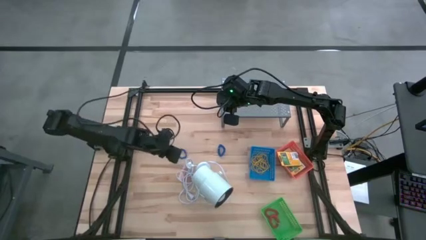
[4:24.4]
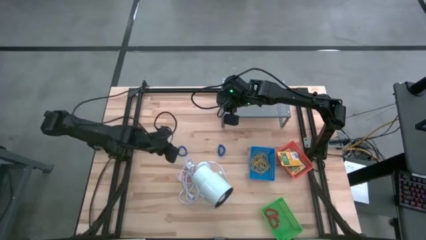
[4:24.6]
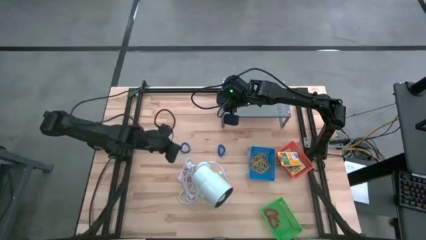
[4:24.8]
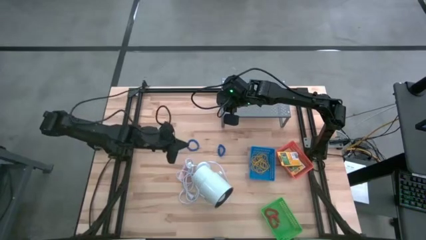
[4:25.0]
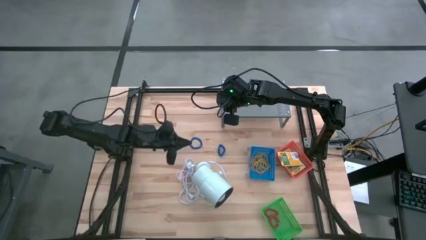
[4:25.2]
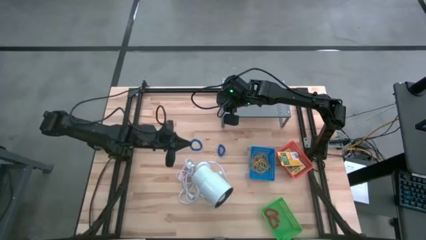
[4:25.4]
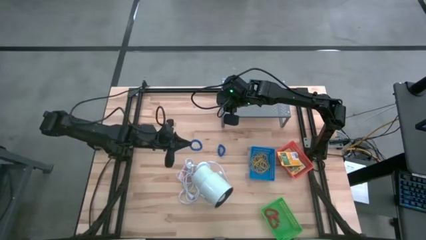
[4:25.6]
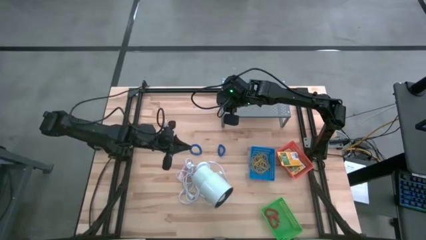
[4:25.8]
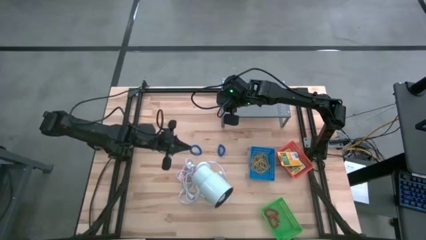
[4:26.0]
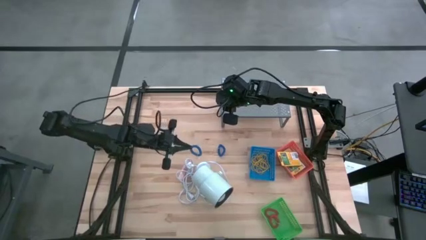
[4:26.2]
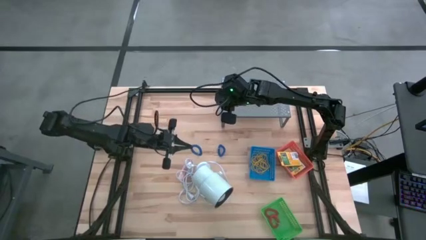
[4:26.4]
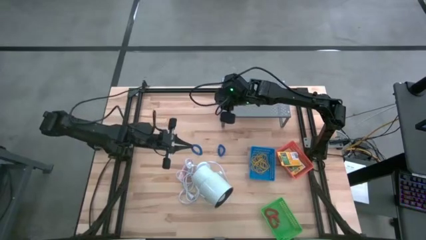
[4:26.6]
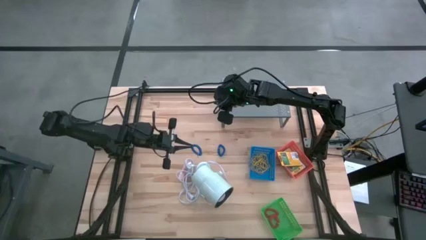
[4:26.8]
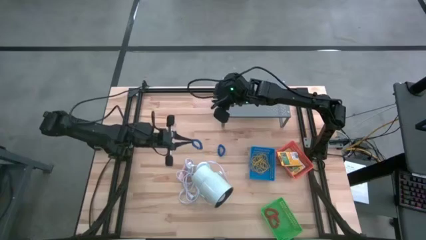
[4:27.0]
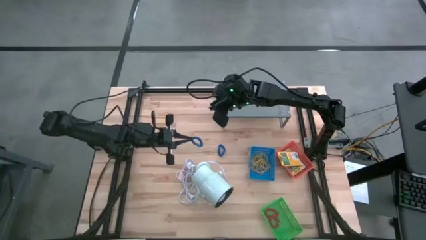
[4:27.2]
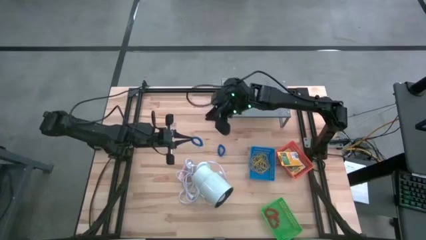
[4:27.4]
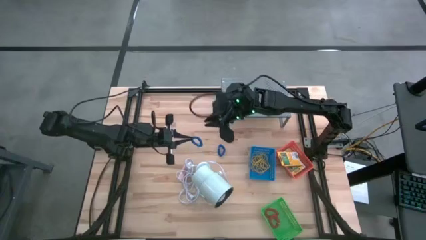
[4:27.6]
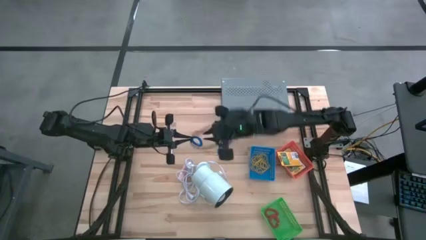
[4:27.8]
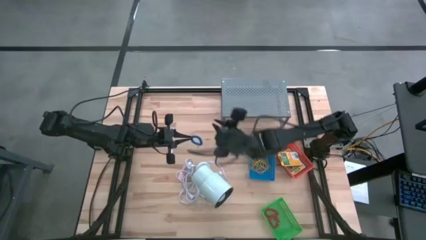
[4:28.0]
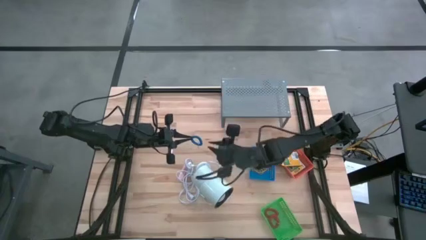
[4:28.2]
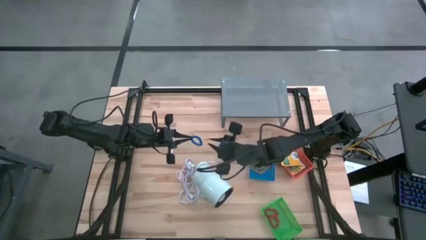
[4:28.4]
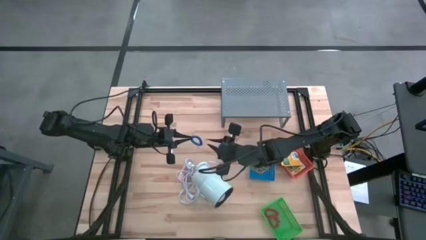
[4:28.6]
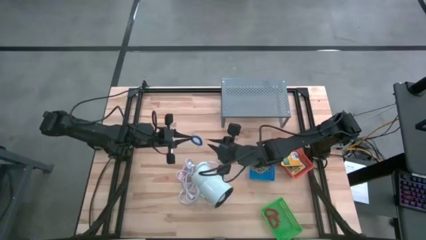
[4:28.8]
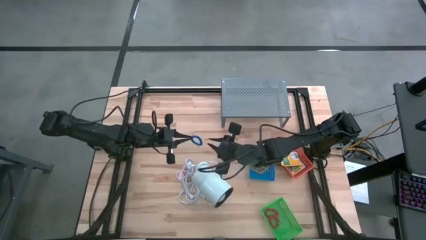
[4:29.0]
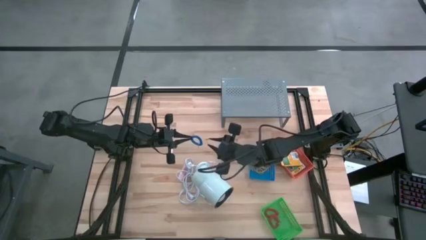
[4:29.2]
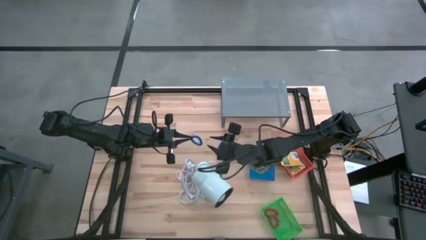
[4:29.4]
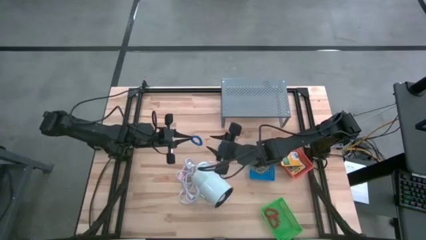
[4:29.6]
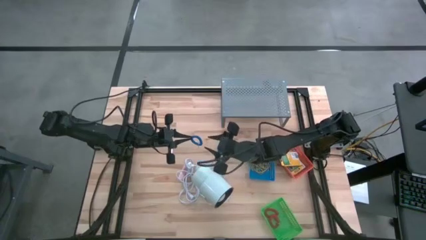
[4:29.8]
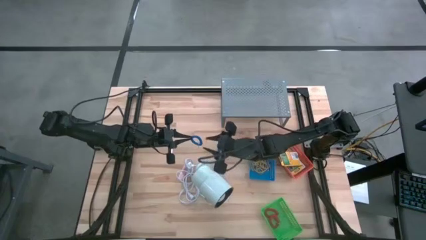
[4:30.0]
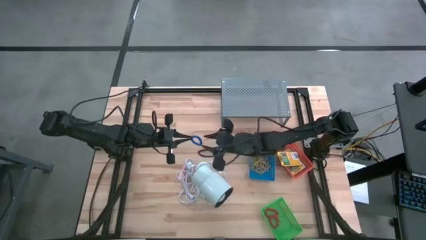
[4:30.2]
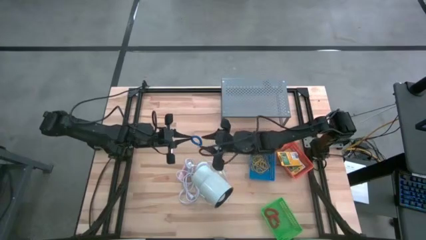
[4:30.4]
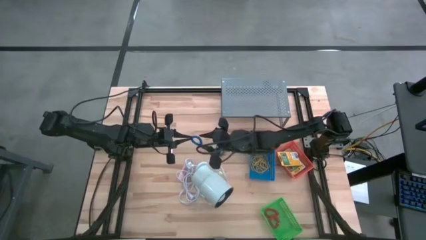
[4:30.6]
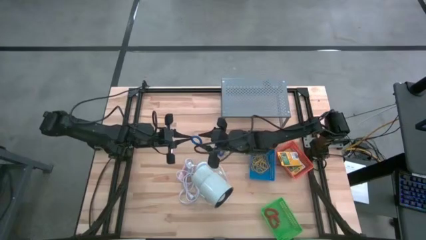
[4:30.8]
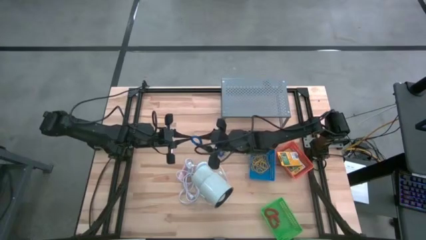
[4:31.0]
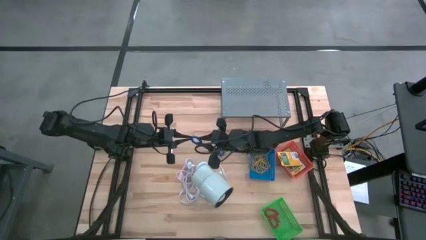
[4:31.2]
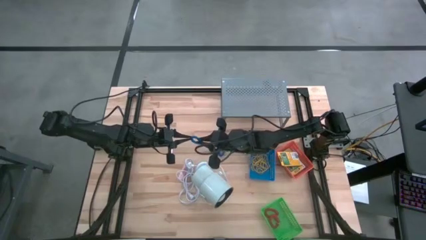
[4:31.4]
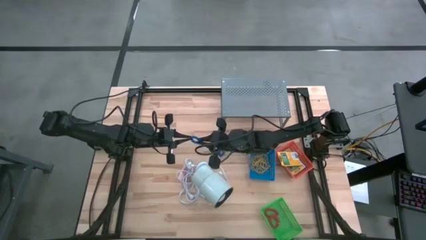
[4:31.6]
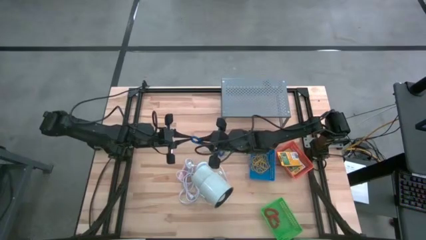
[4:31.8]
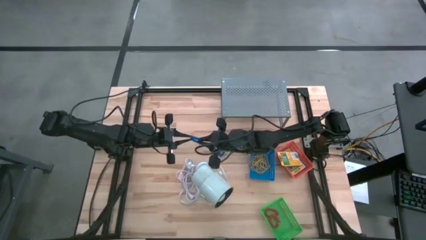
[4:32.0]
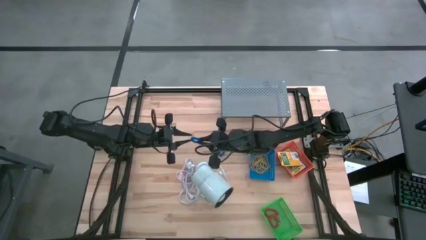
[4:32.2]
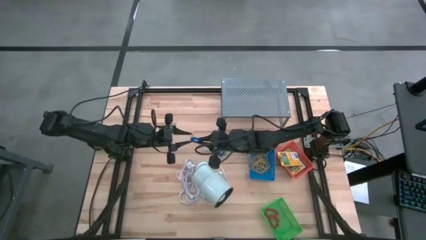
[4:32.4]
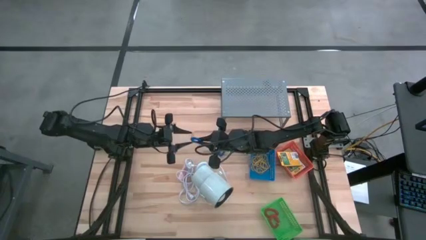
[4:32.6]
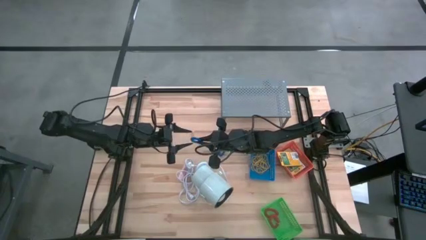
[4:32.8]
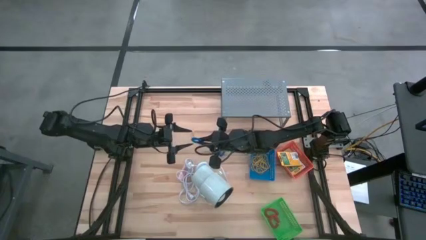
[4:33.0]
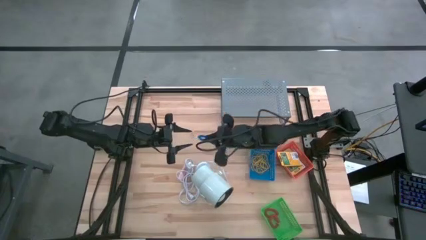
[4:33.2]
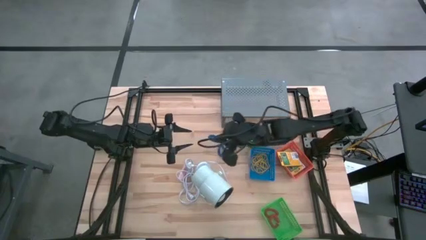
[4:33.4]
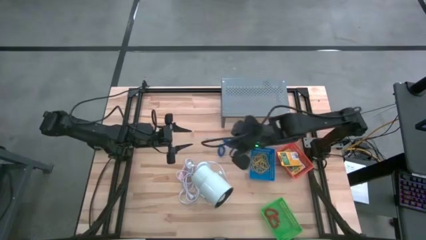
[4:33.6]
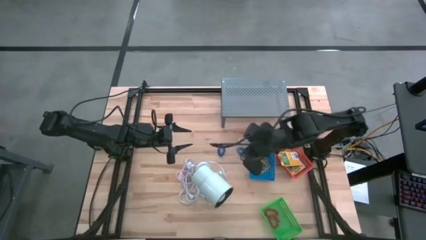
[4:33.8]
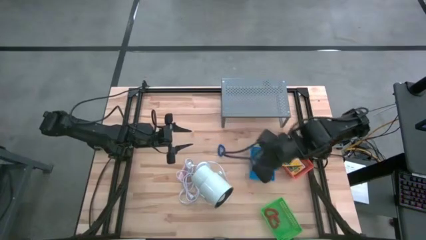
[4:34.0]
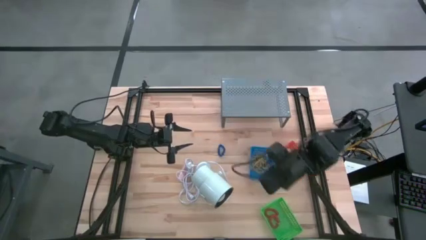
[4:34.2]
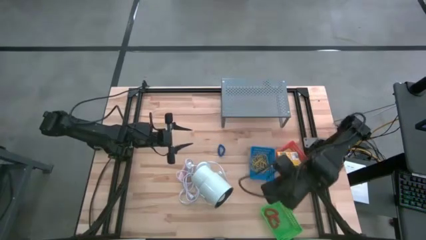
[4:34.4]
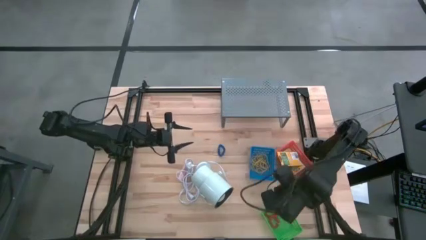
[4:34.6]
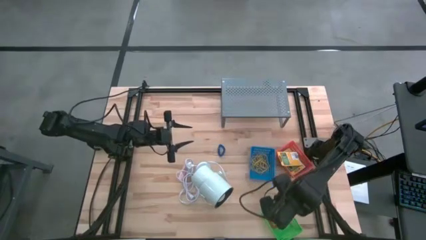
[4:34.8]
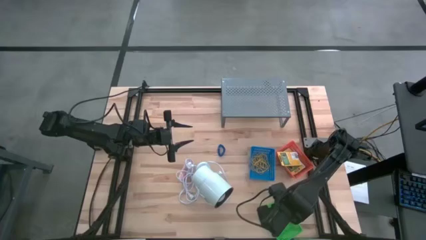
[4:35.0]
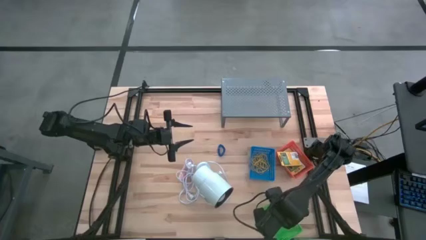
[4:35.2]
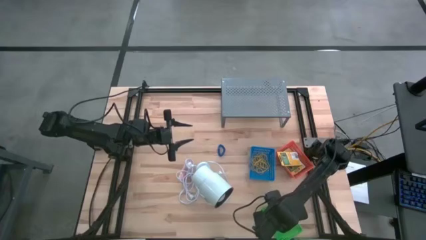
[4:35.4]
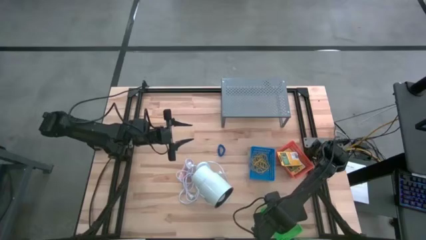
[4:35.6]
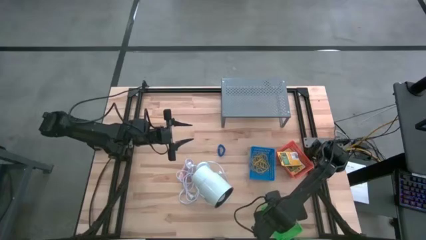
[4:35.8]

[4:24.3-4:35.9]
Task: Pick & Place Office Desk Supplies
Put the blue spring keychain into the green bin

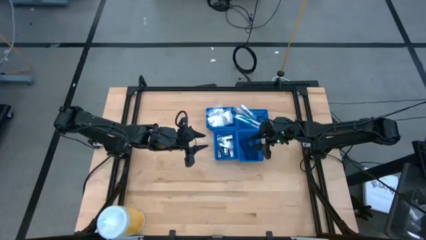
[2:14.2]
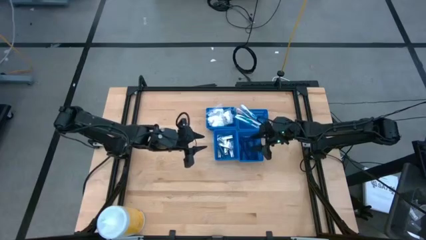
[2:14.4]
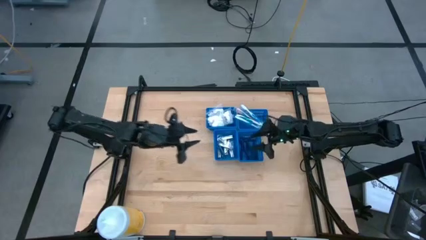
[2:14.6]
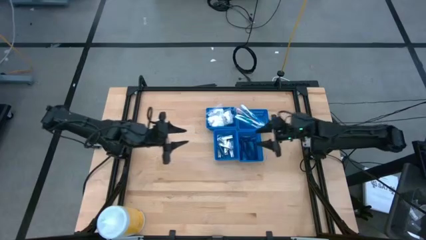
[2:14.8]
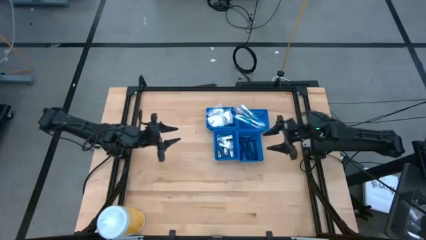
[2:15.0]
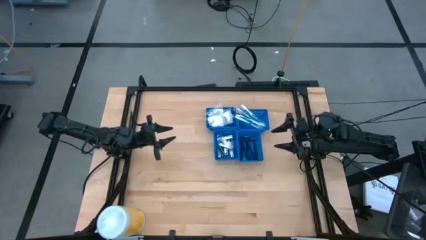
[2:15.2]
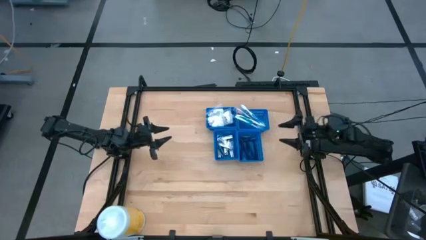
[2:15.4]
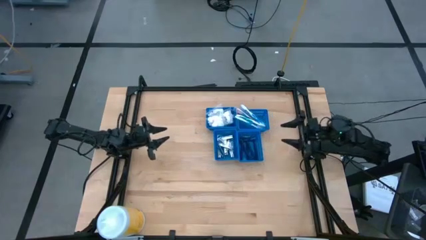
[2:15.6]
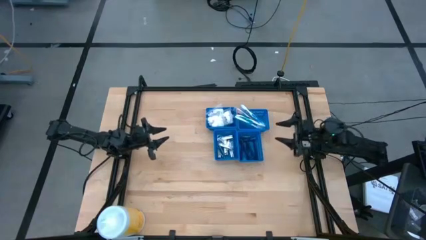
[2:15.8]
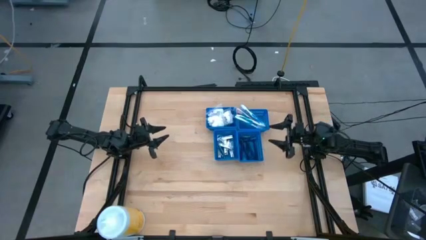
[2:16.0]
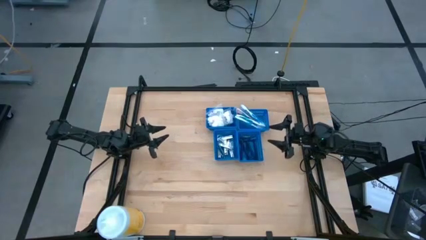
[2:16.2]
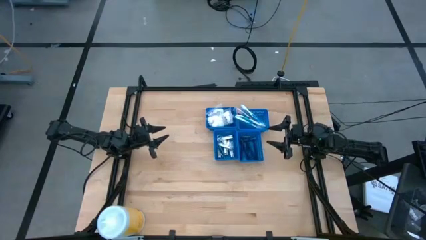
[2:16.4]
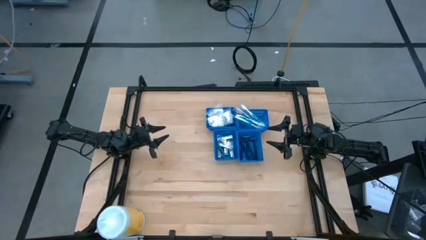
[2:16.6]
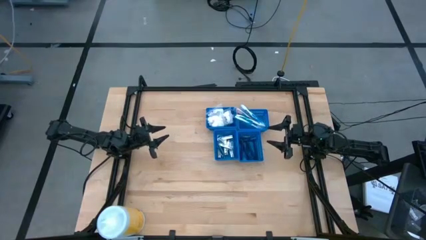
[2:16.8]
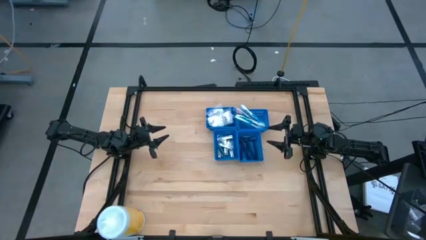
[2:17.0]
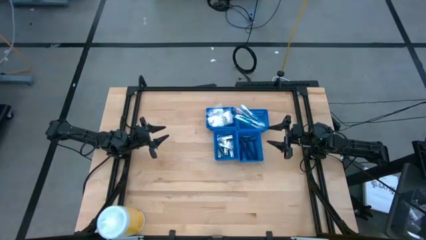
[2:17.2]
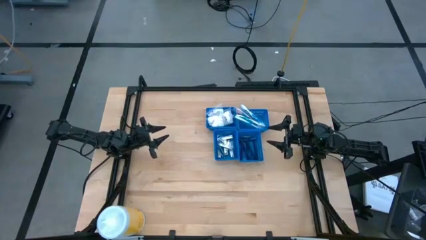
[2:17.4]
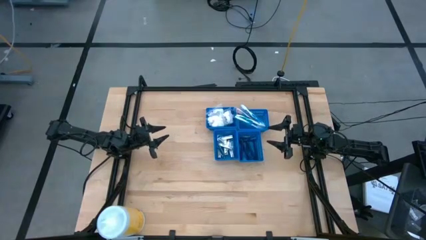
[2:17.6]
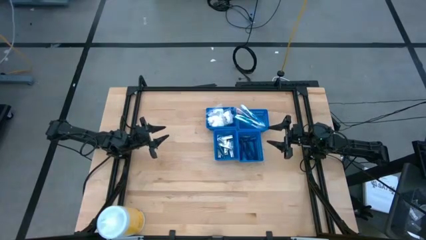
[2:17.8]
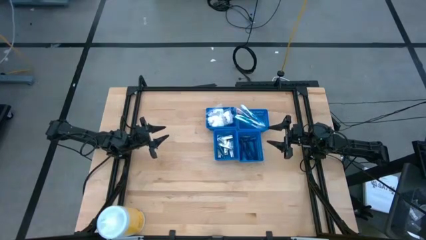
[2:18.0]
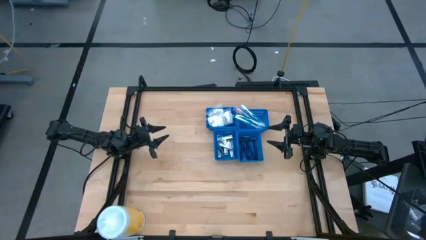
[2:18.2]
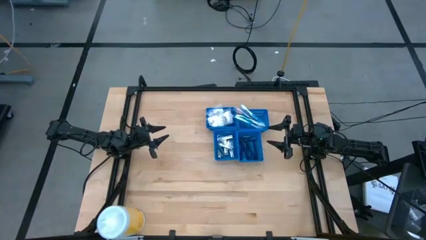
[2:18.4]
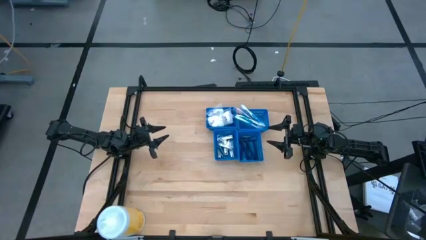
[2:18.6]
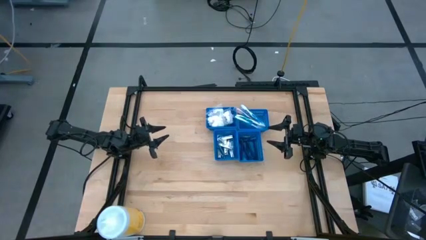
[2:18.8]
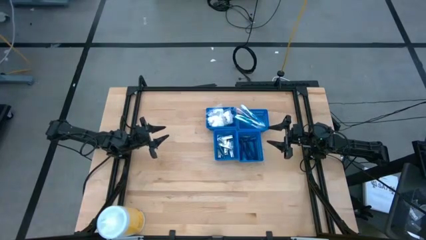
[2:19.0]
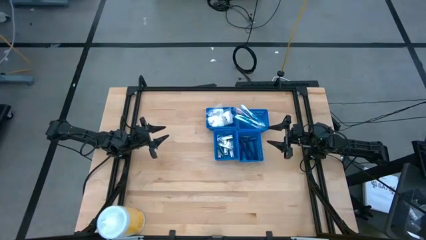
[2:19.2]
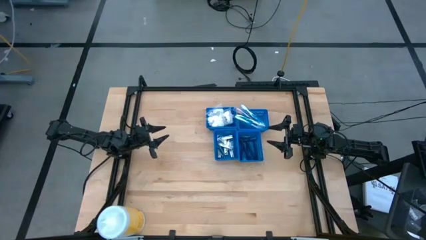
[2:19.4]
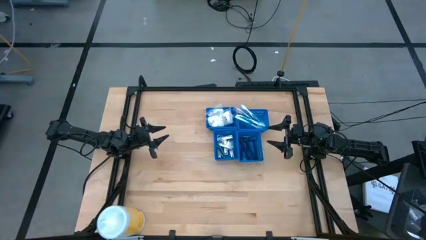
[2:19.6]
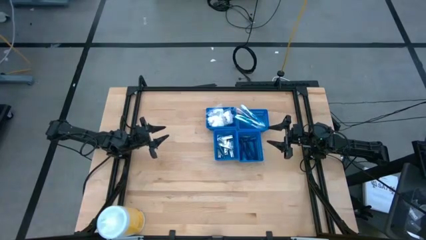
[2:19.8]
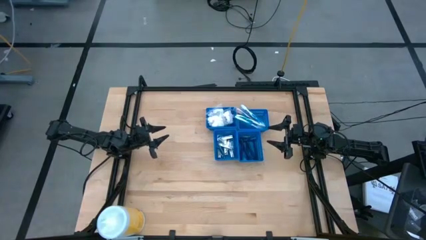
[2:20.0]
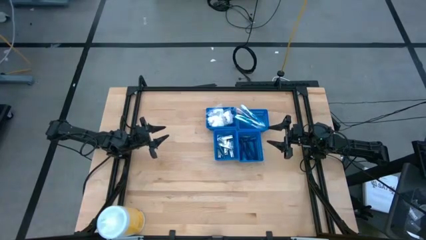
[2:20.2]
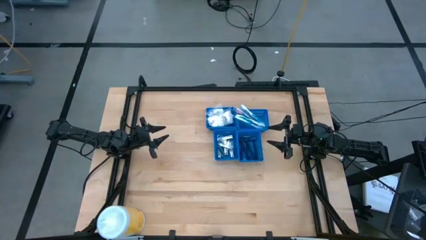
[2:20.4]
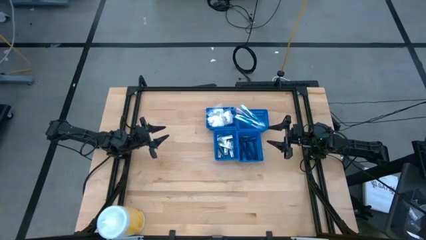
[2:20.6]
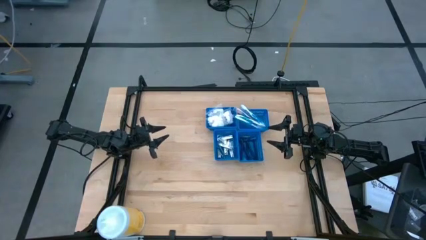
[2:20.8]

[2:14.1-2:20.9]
Task: Pick & Place Travel size toiletries
Return to Home Position
